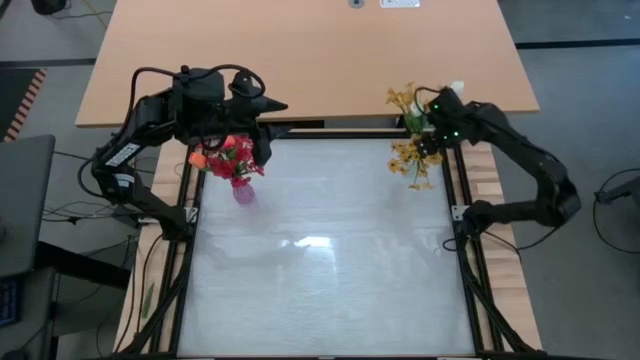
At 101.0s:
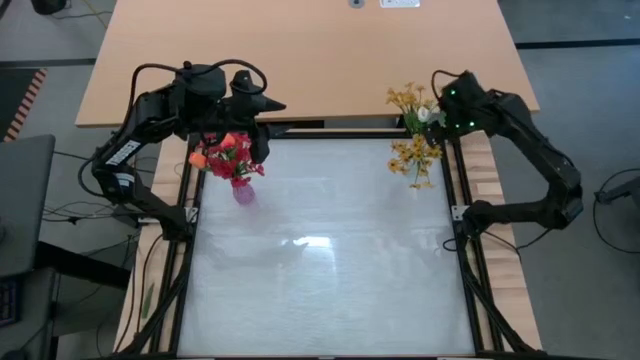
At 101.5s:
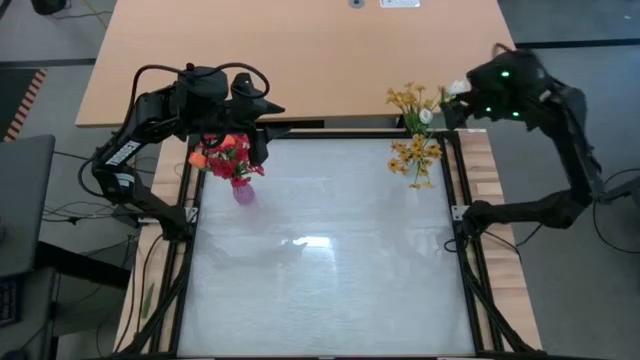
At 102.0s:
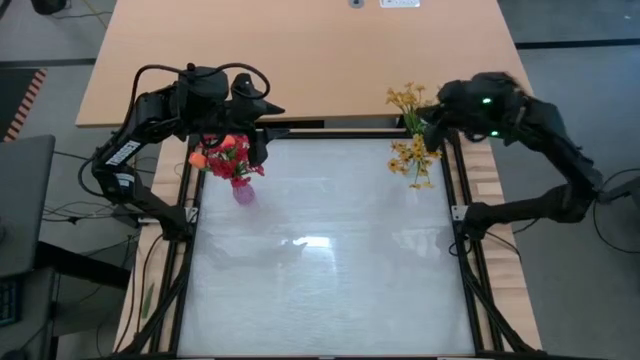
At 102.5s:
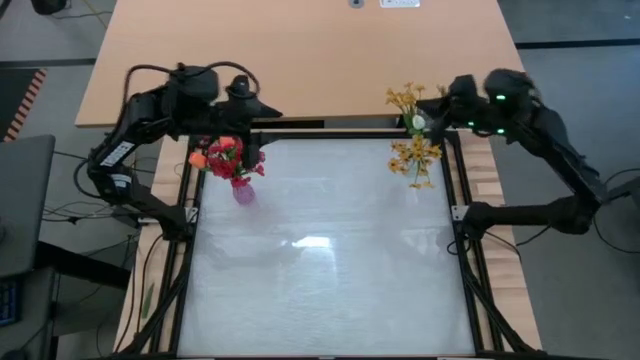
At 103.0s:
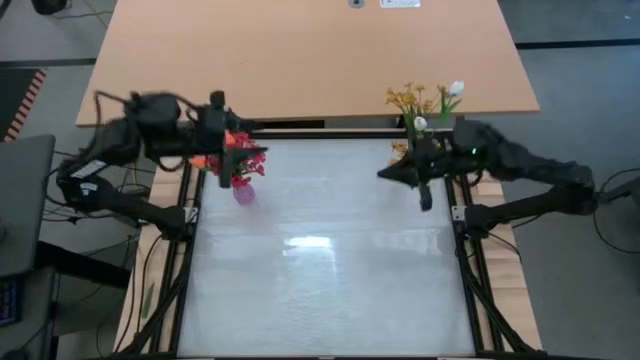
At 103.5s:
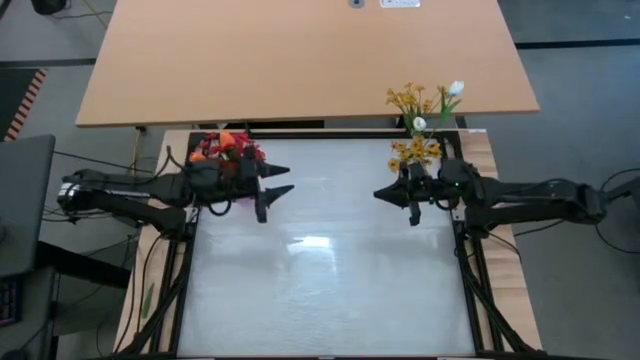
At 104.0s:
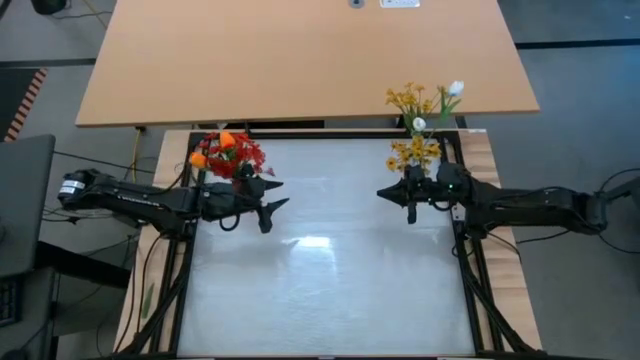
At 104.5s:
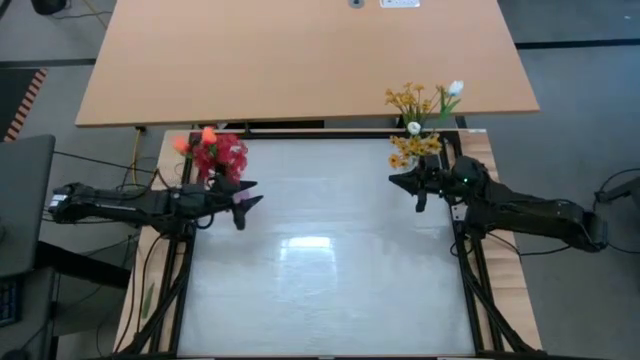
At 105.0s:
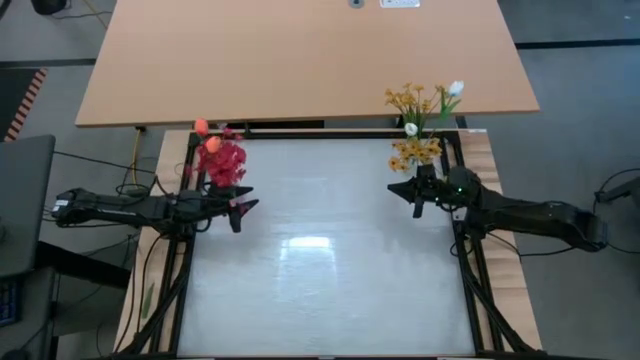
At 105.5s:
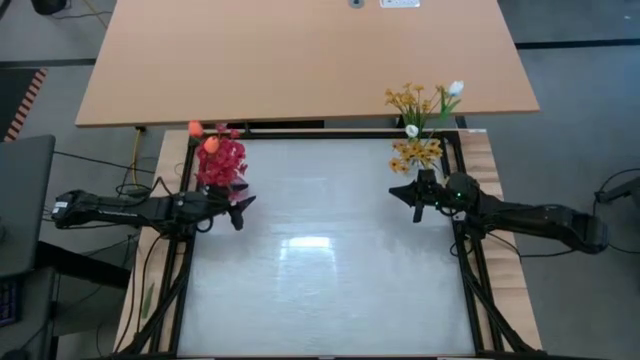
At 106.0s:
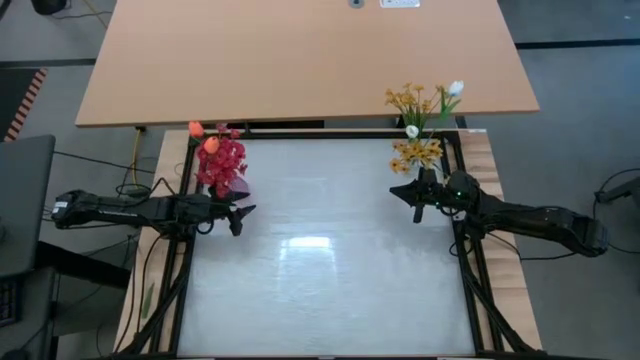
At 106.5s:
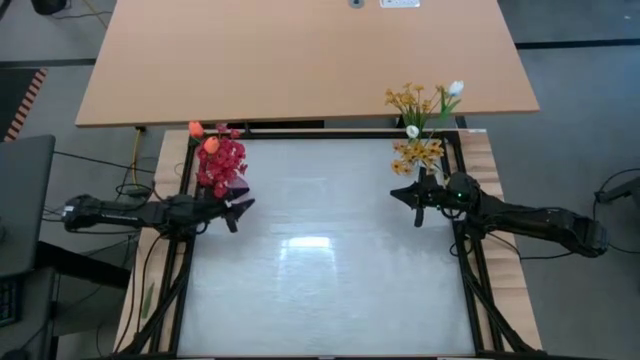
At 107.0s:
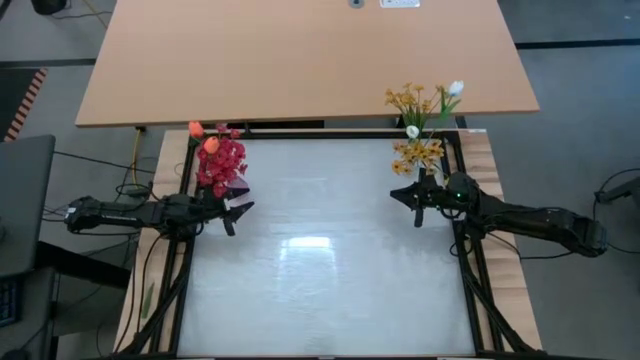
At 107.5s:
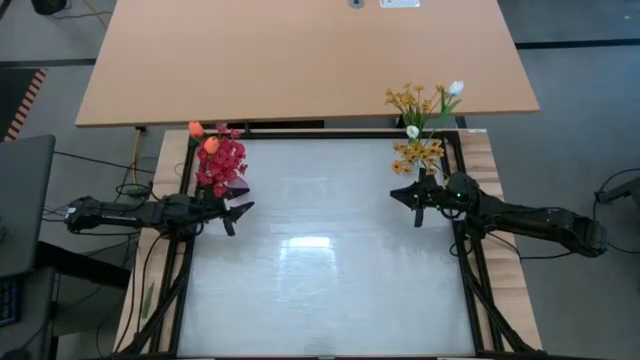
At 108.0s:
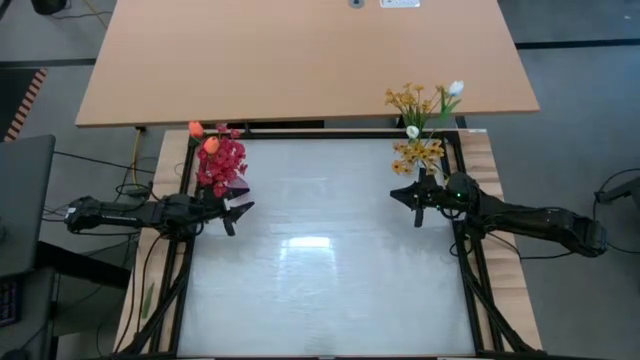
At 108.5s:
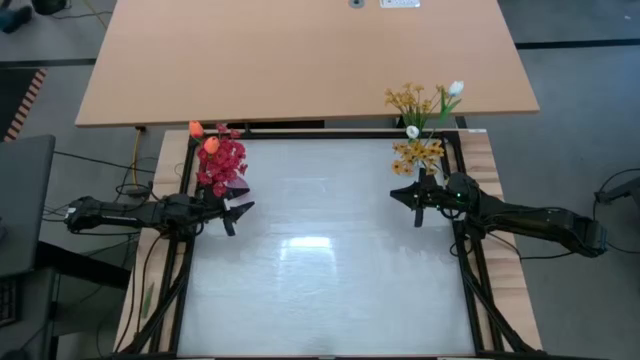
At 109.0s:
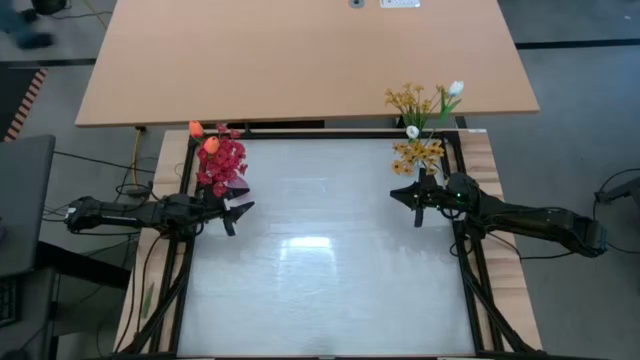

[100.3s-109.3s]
Task: Sort flowers into vase by color
Return to Home Position

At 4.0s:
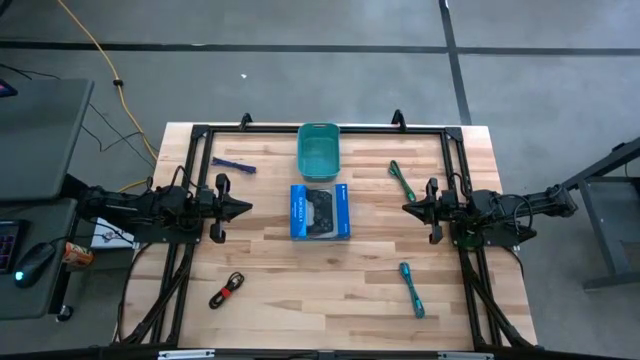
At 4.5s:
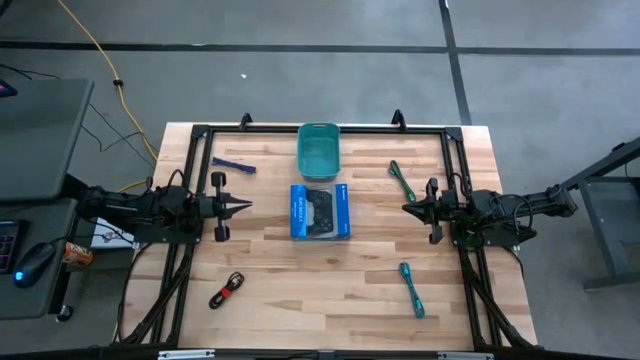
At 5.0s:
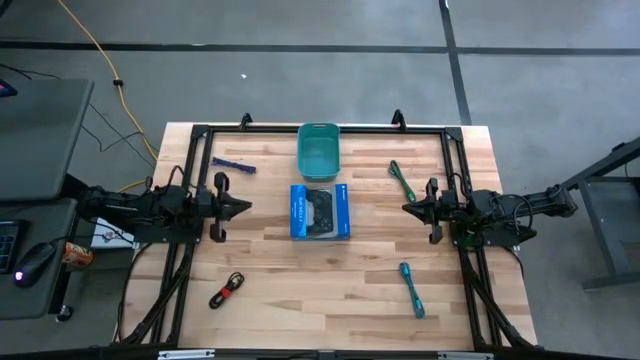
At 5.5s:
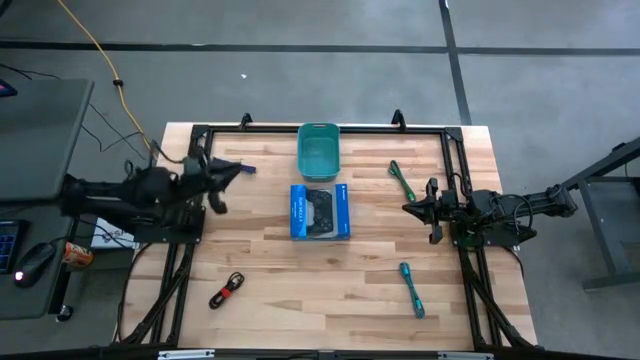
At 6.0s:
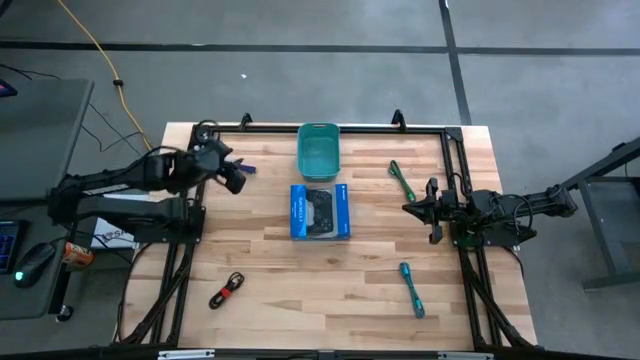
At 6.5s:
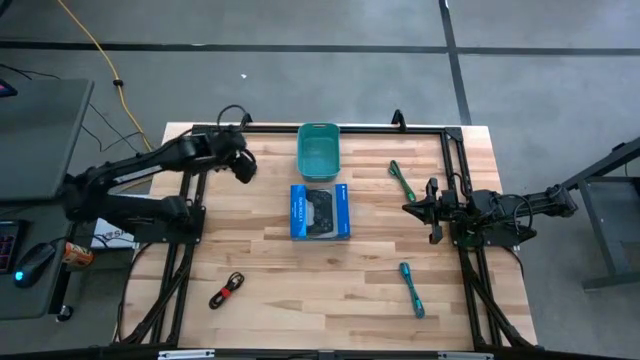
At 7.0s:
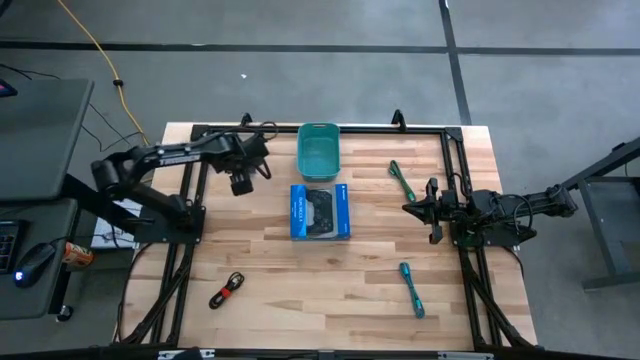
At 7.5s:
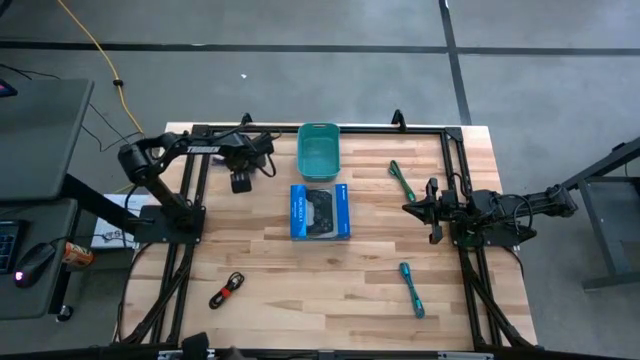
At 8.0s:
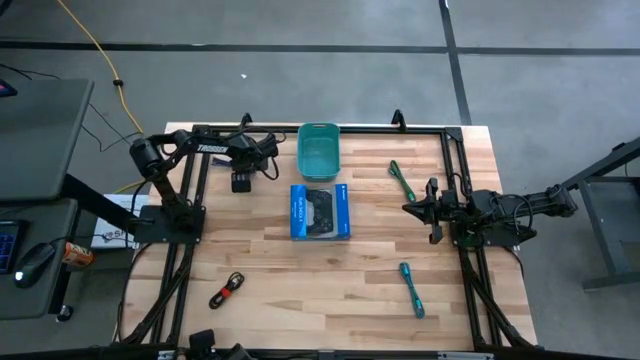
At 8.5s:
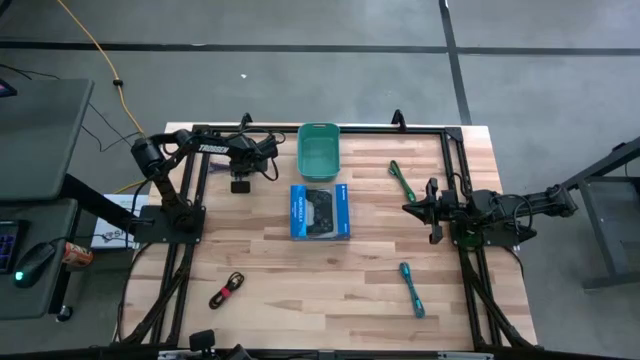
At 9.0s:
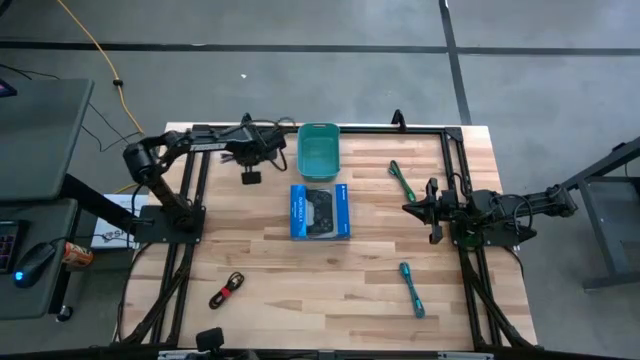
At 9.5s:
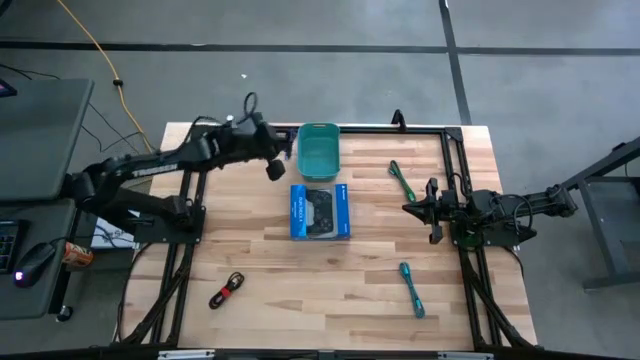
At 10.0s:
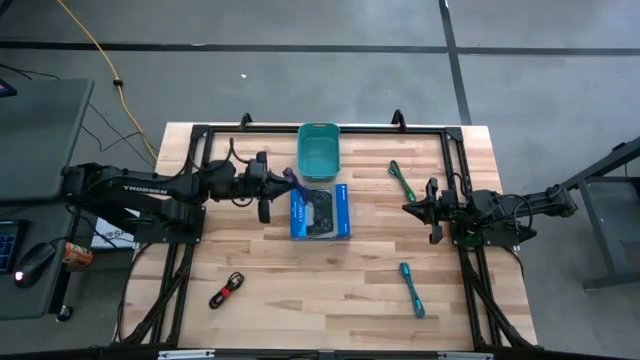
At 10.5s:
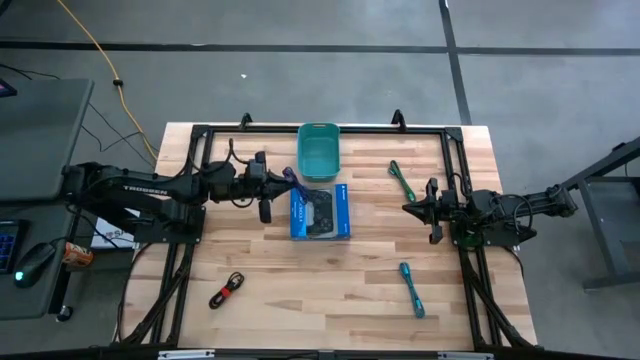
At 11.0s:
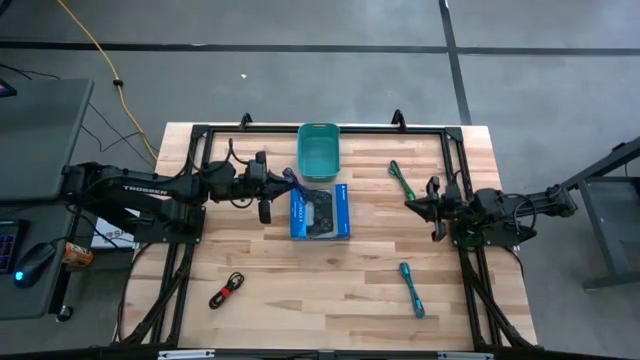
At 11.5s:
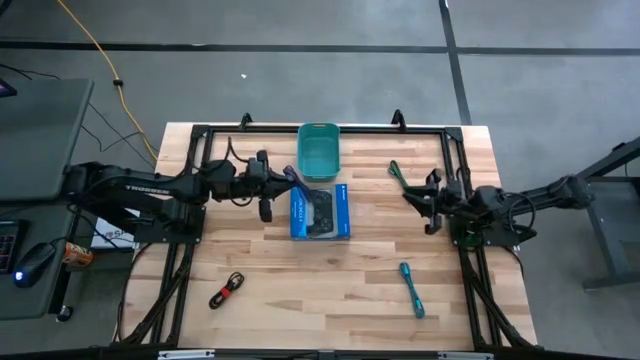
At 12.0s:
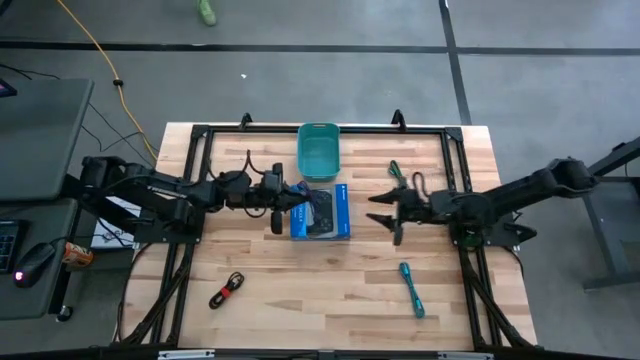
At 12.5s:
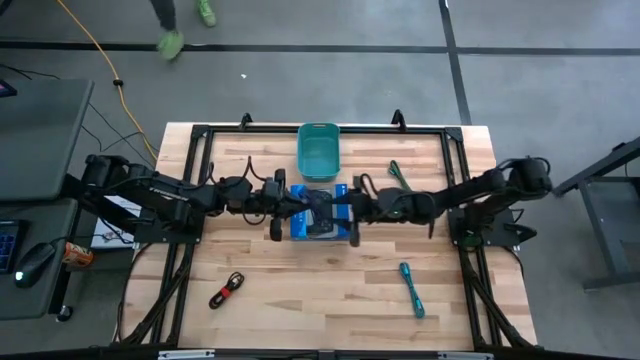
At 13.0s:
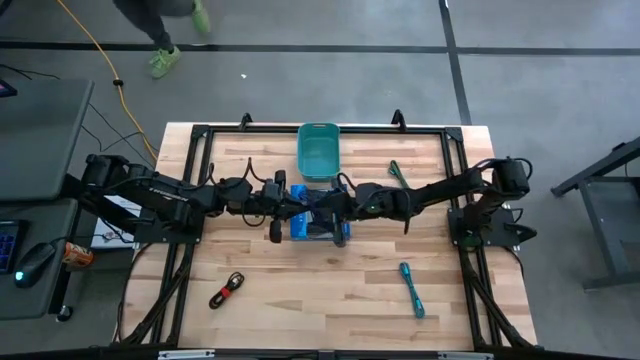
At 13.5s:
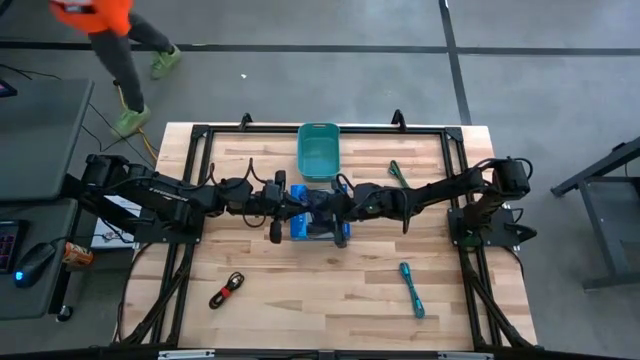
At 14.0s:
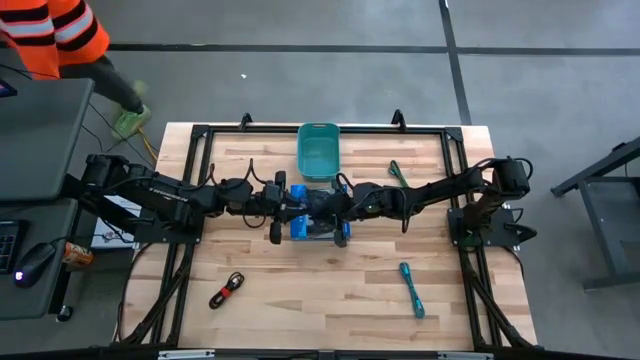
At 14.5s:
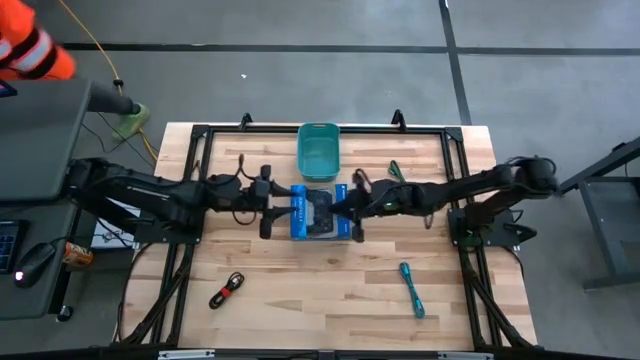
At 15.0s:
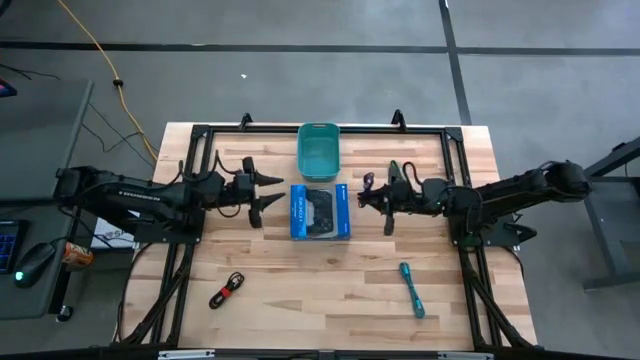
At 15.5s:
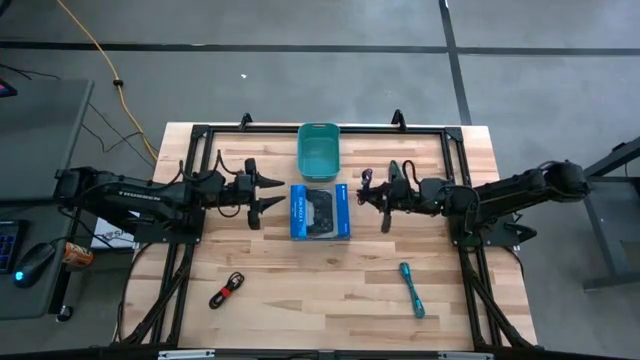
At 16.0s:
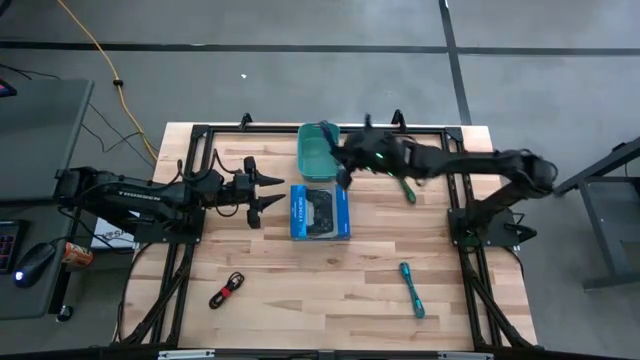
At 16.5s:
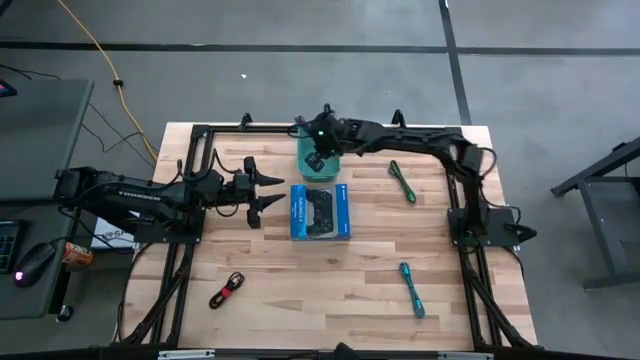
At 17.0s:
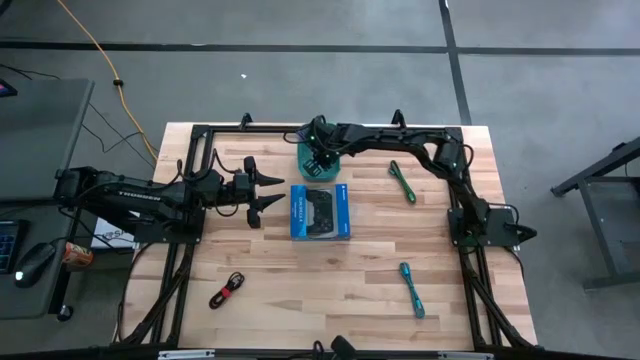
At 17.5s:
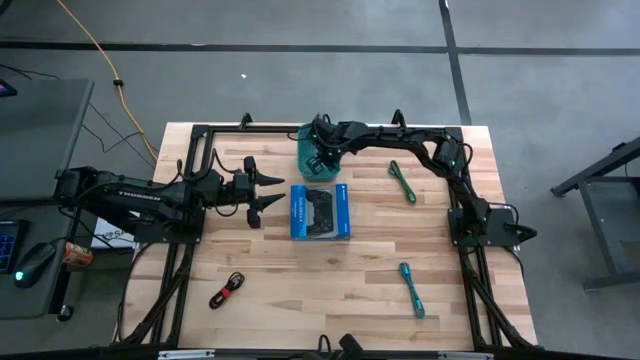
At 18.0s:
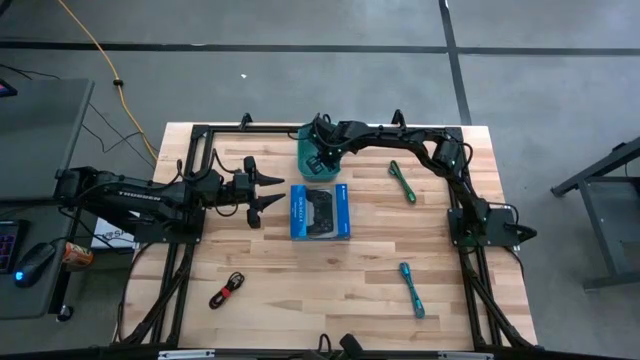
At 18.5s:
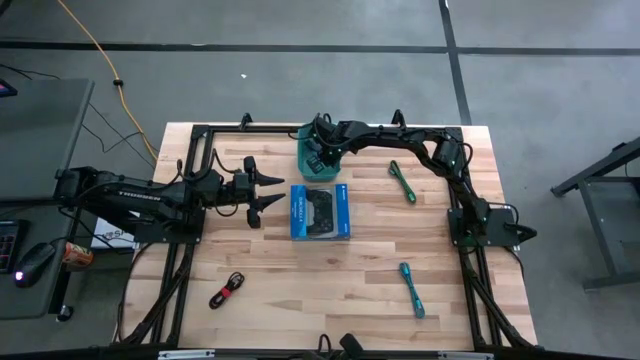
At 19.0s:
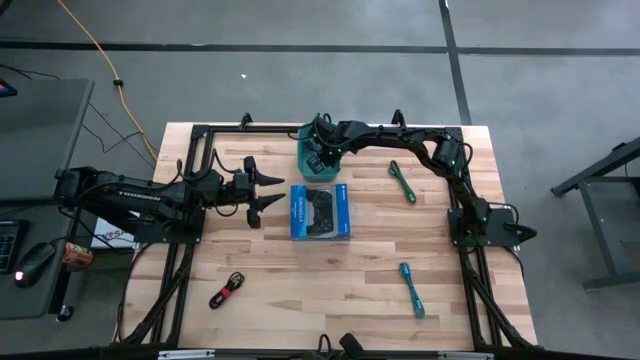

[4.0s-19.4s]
Task: Pick and place USB-C Cables
Put the violet charger cable into the light blue bin
